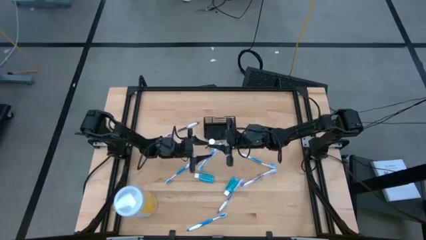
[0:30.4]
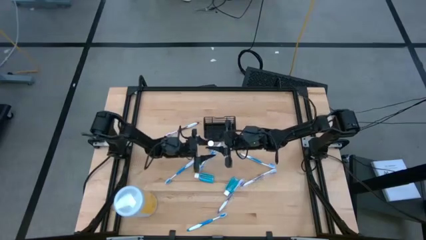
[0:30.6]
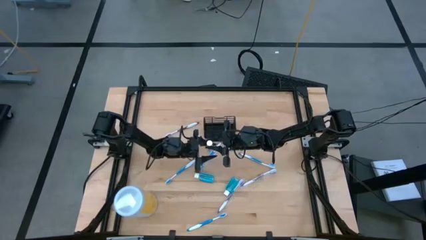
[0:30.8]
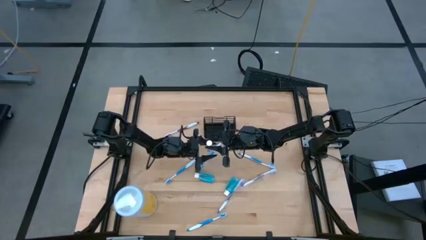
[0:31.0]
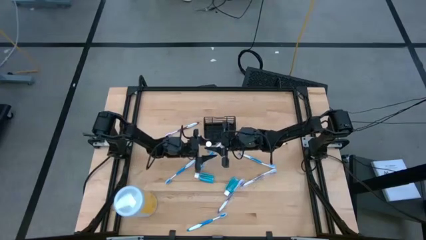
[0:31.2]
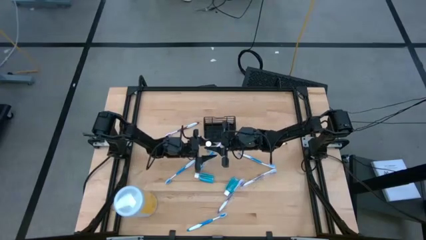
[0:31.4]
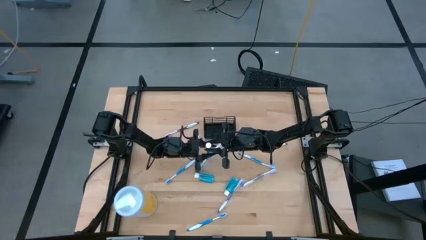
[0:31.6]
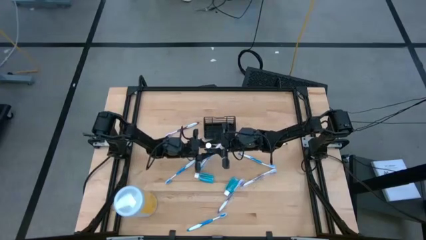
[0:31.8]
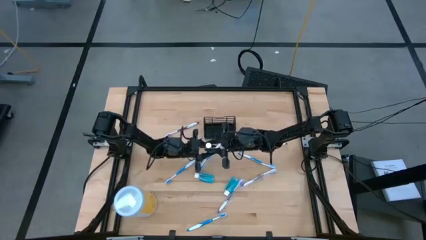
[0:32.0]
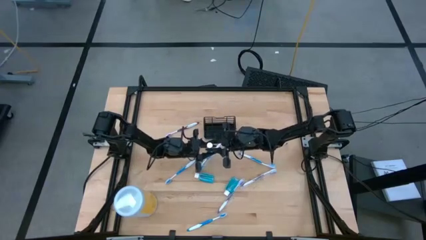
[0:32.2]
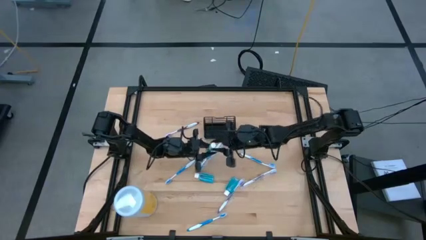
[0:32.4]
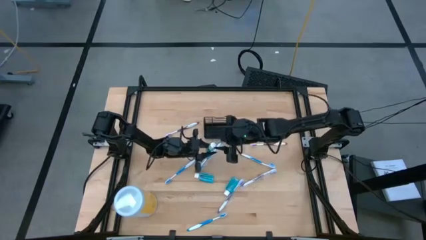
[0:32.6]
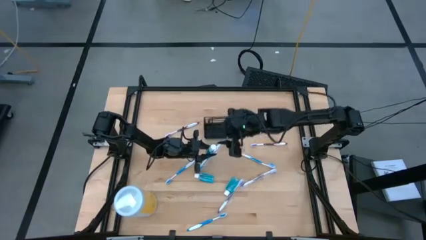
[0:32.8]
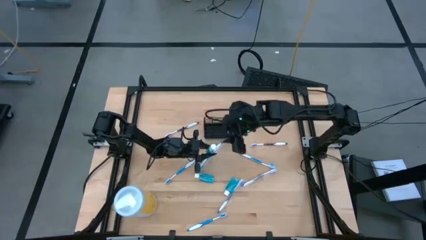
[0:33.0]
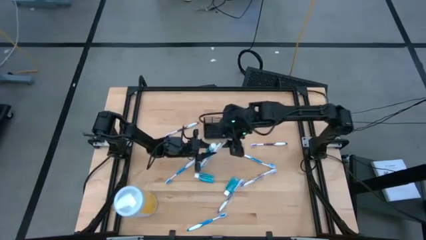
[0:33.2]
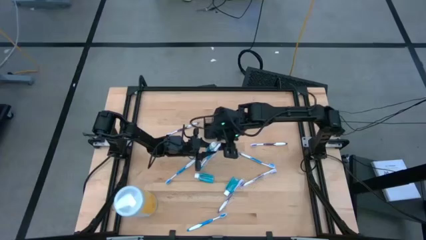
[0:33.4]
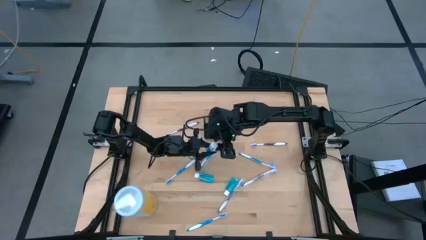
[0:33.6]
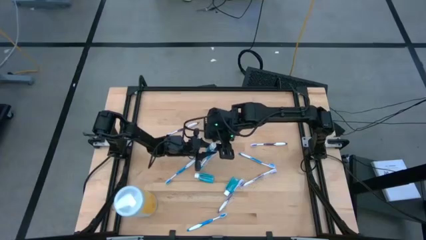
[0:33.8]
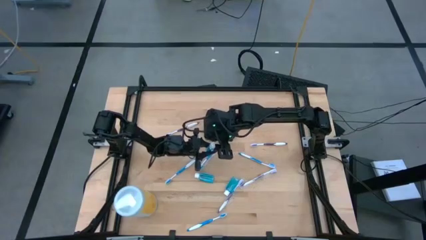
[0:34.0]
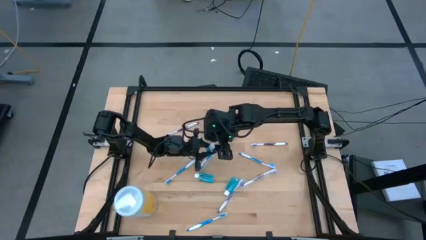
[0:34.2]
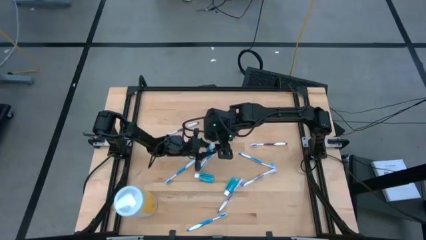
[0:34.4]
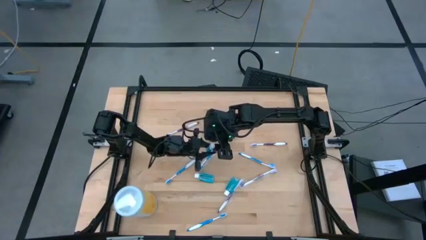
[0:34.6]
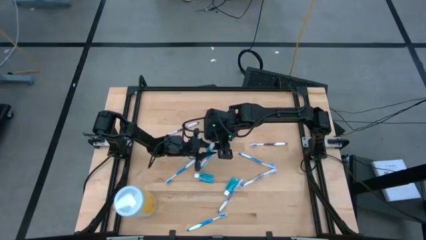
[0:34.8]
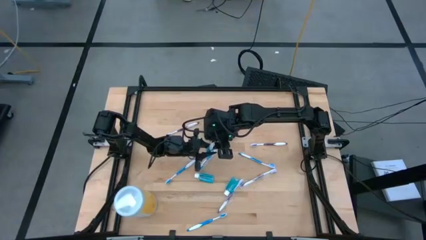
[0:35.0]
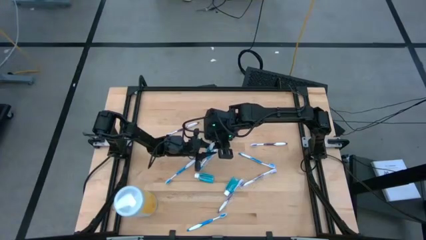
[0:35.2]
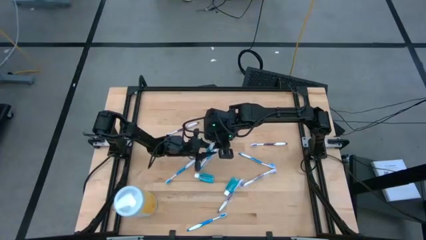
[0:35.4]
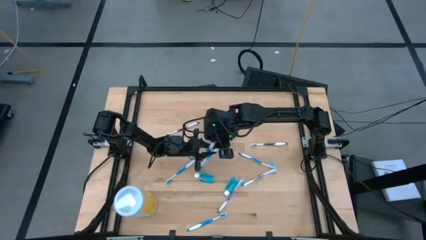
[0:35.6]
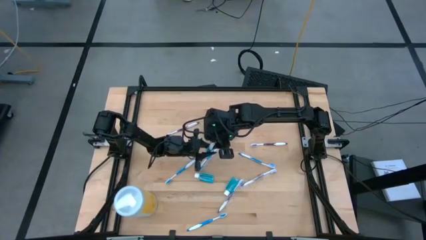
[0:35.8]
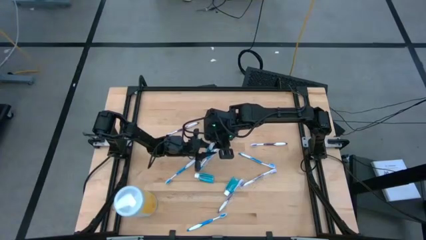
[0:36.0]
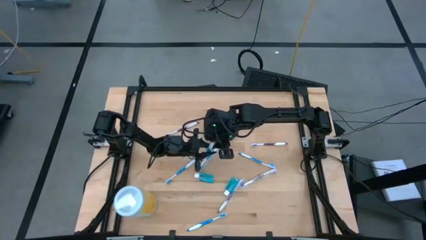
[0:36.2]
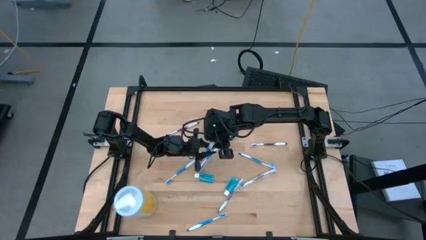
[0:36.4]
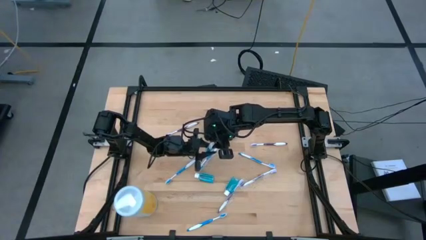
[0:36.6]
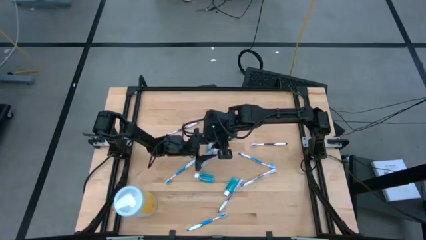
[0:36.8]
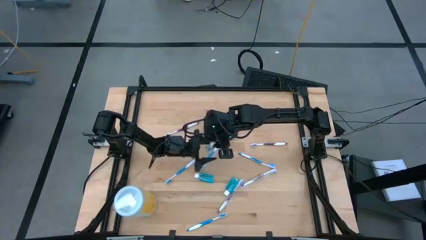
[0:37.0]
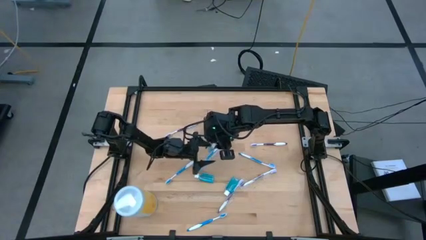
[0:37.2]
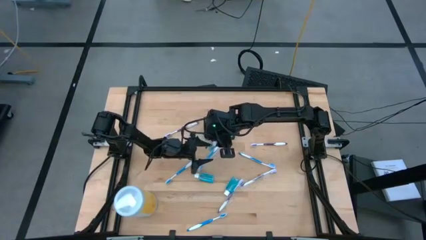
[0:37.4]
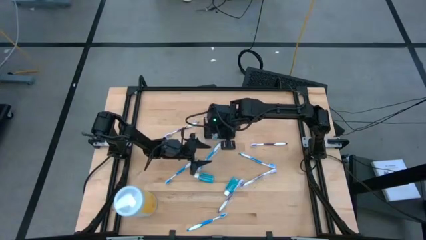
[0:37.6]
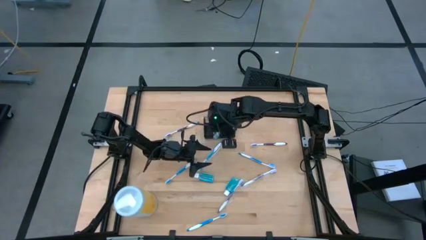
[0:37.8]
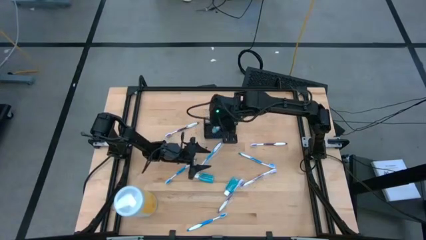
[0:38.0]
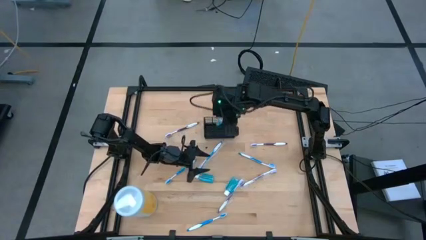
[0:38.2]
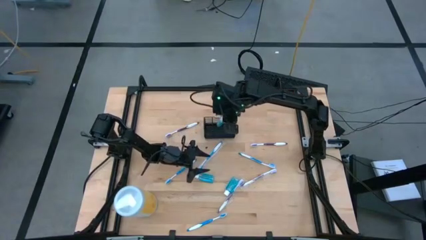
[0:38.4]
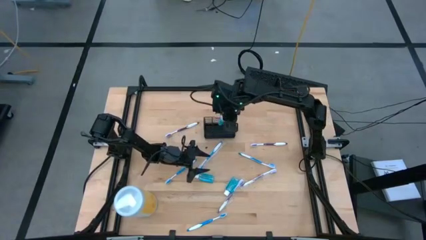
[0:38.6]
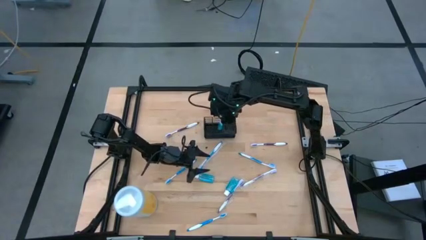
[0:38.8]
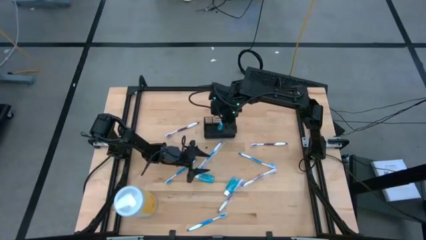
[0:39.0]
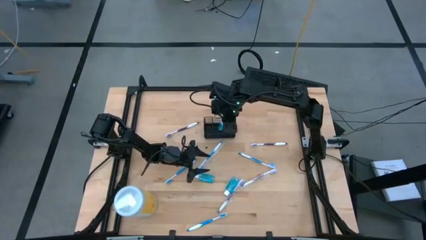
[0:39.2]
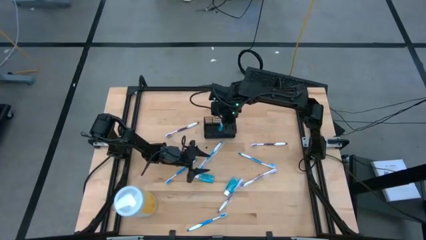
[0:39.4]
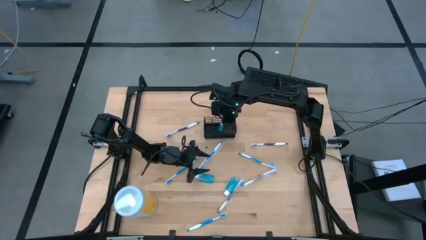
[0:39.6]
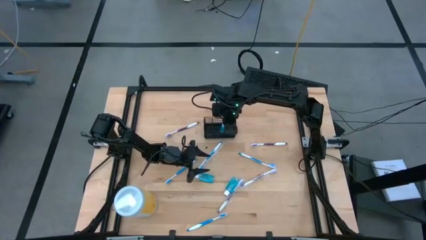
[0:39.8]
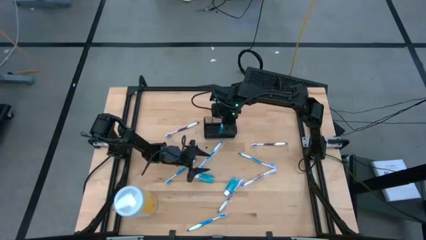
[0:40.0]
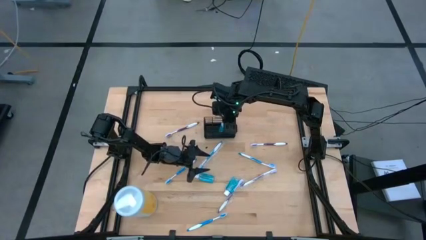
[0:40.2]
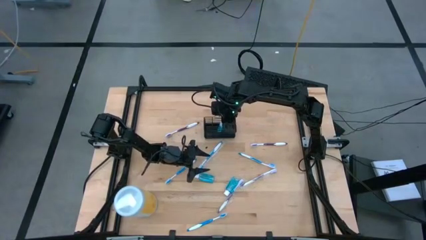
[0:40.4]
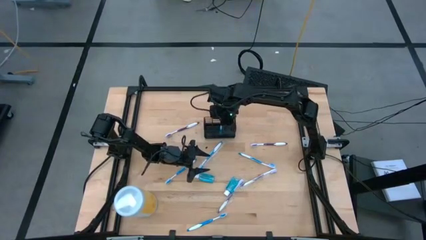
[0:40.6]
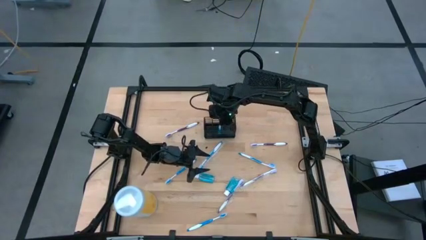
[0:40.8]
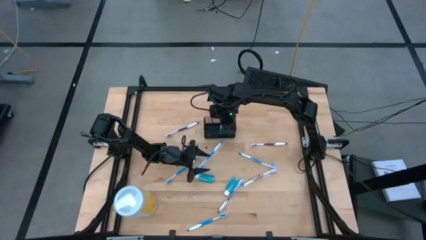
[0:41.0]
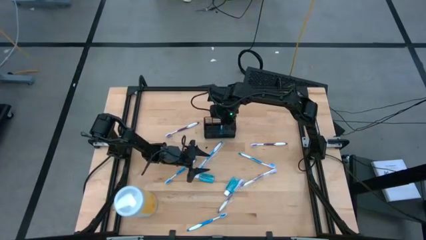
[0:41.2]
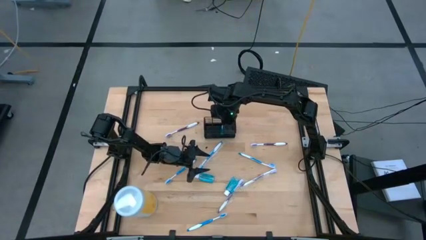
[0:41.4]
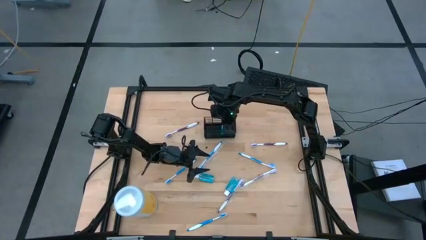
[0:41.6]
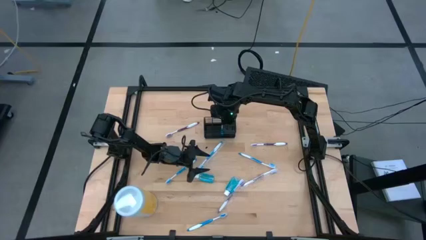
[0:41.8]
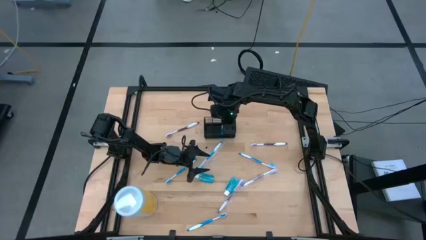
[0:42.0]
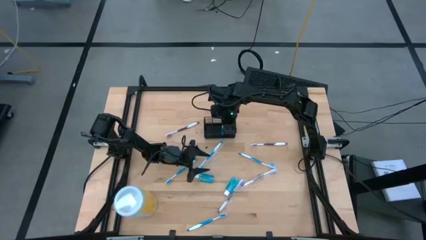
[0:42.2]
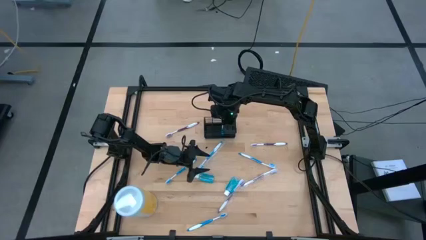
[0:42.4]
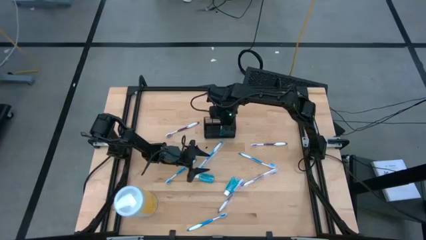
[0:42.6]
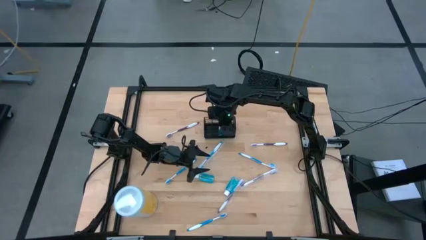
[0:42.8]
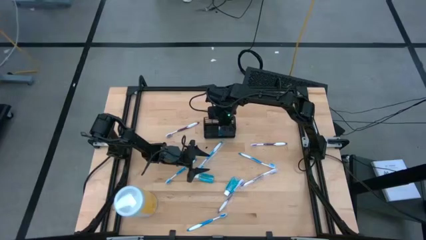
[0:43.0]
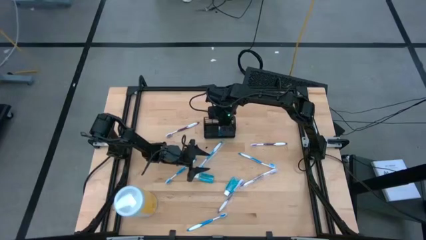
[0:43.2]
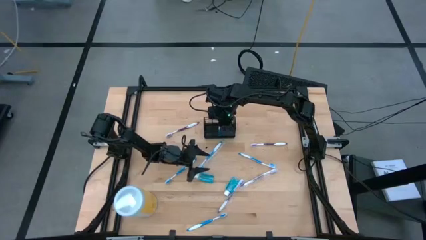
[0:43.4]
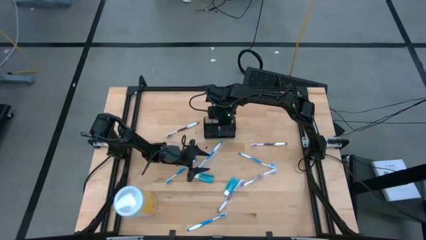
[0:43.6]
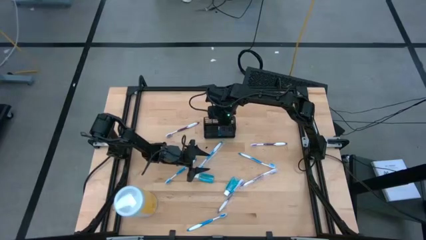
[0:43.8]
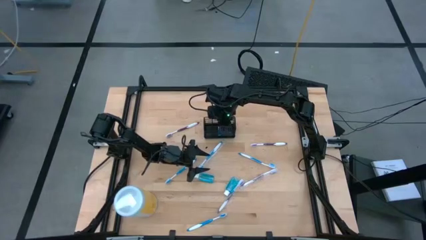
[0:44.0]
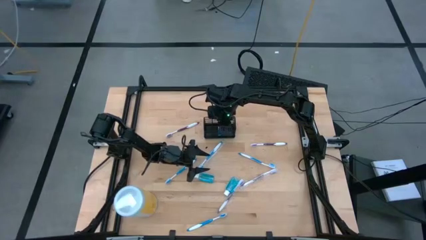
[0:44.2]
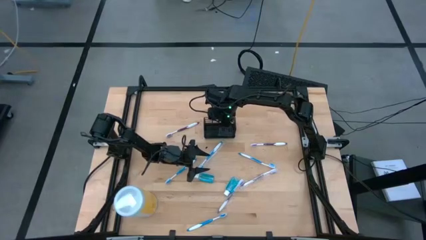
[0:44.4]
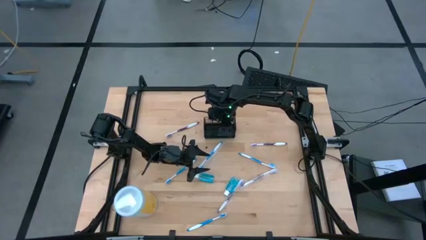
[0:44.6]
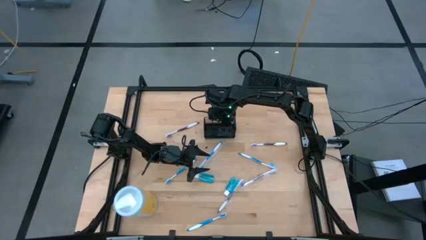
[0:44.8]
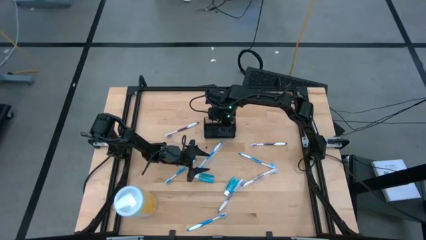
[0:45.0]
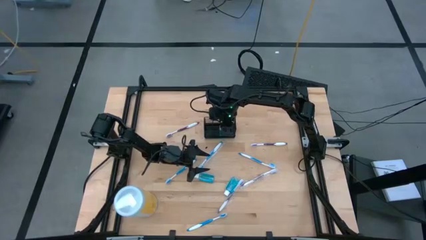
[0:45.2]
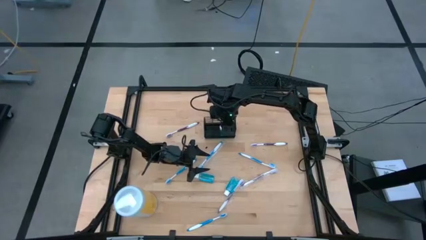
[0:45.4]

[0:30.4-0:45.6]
Task: Pick & Place toothbrushing station
Put the blue mouthwash bottle into the black organizer

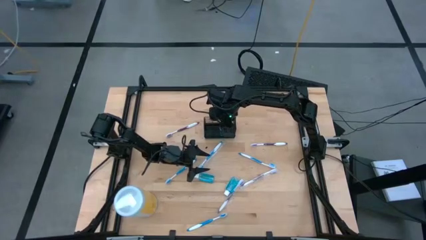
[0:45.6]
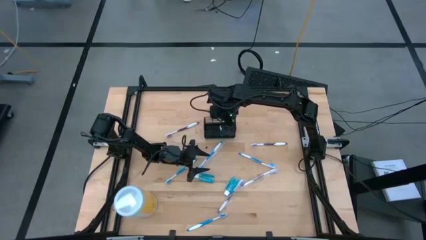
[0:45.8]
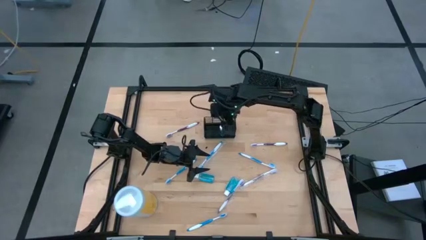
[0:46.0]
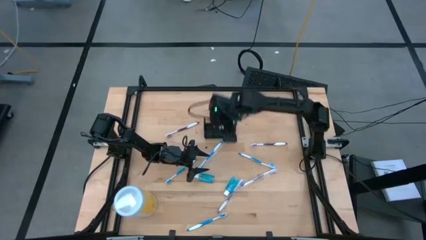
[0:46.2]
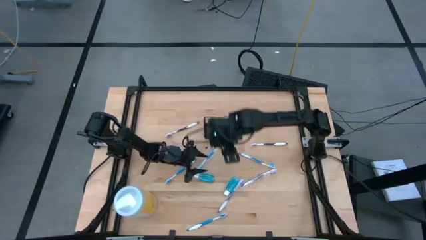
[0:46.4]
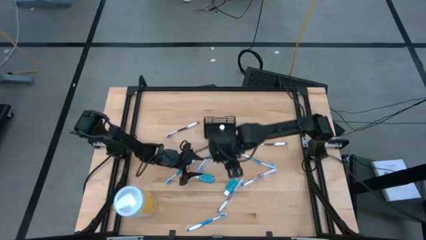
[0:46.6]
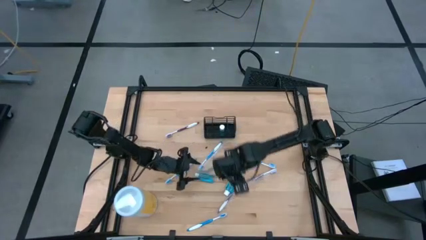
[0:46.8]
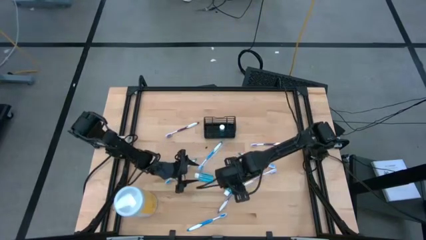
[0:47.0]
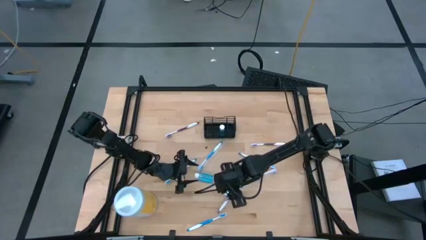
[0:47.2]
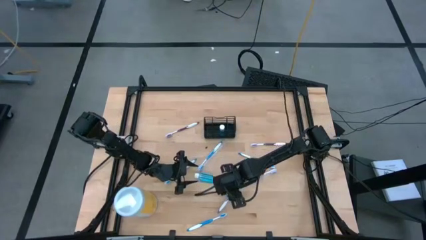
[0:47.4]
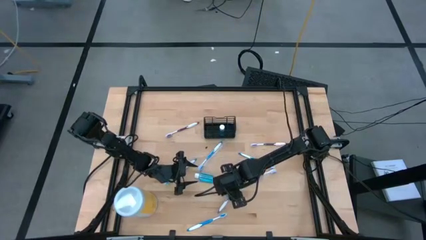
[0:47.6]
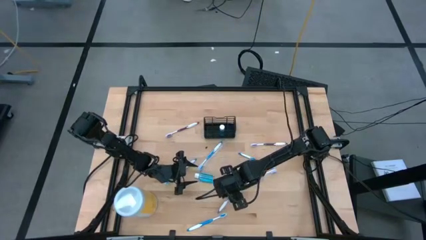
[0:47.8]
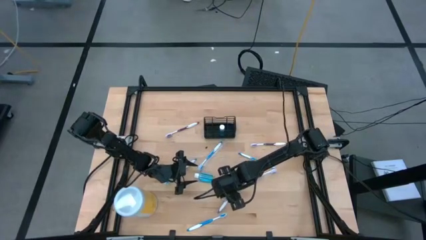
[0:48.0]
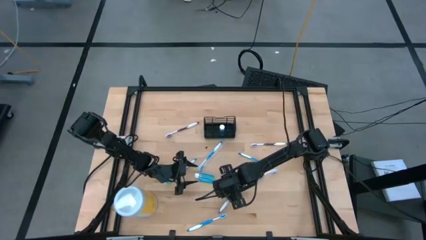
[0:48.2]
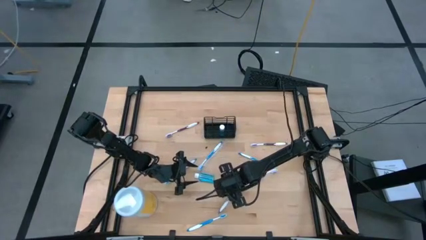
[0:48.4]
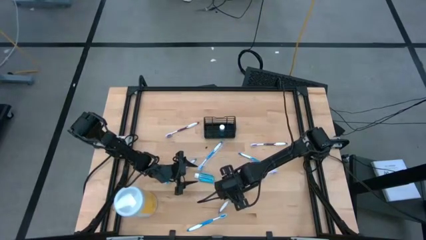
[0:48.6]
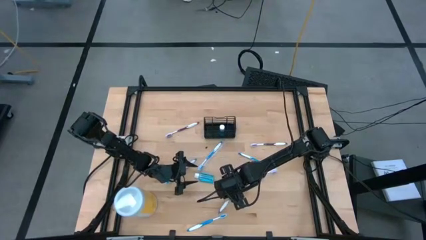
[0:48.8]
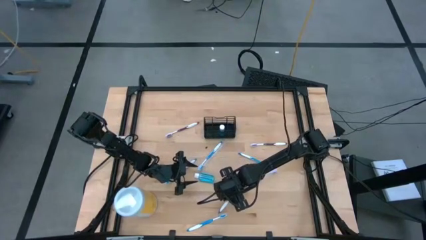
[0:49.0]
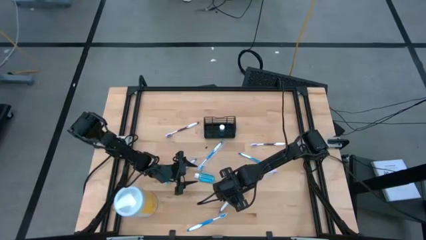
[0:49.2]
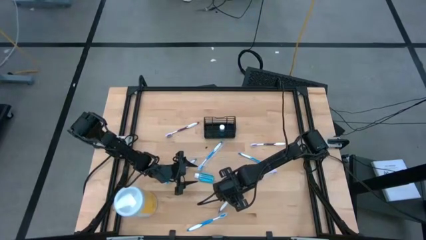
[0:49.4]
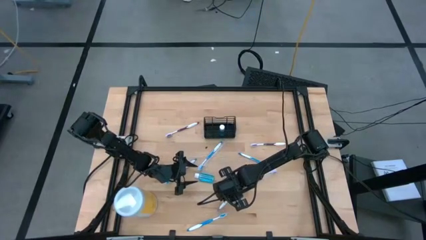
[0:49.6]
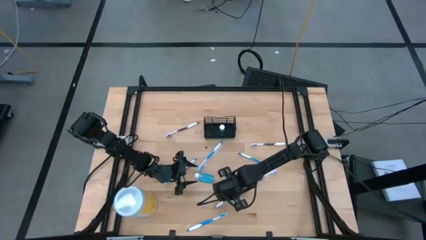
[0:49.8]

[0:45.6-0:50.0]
Put the blue mouthwash bottle into the black organizer
